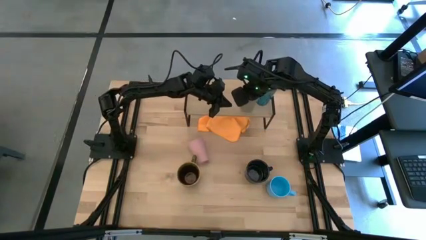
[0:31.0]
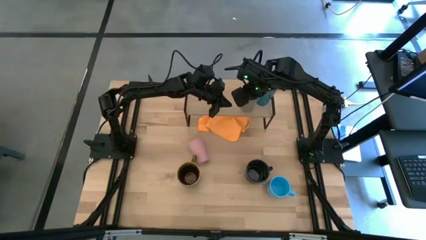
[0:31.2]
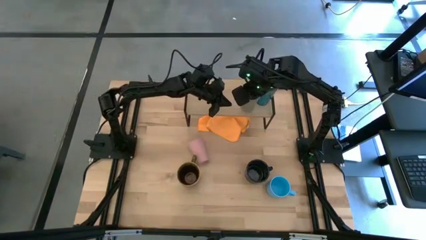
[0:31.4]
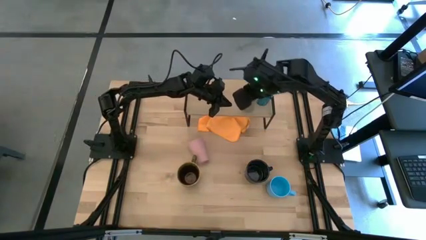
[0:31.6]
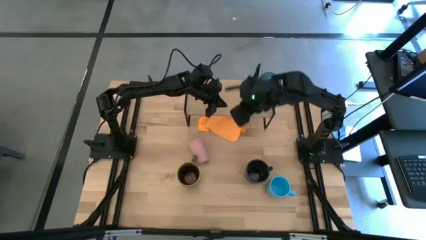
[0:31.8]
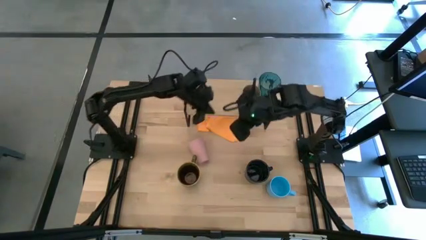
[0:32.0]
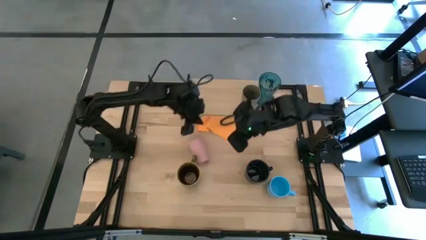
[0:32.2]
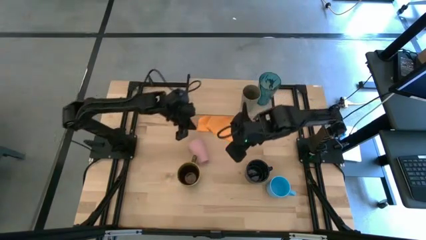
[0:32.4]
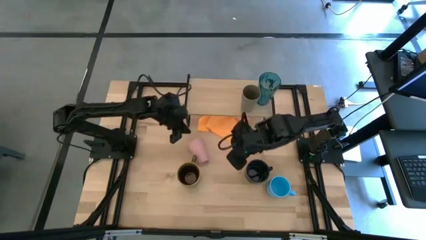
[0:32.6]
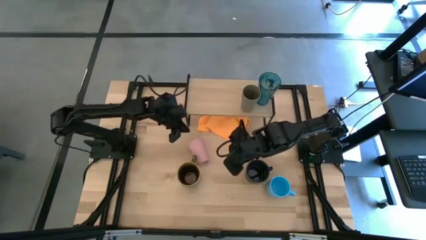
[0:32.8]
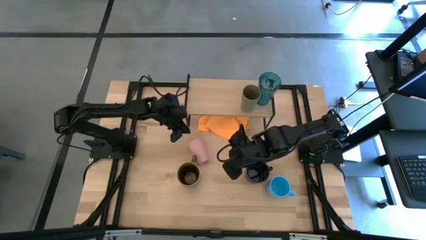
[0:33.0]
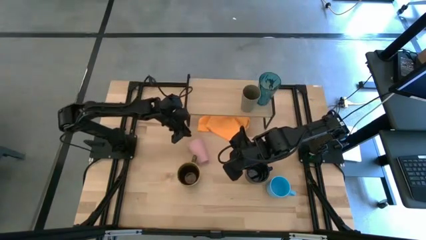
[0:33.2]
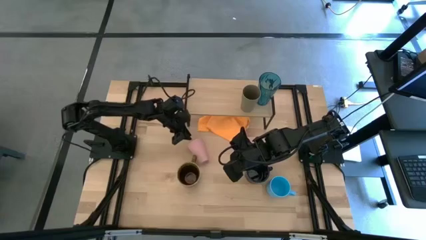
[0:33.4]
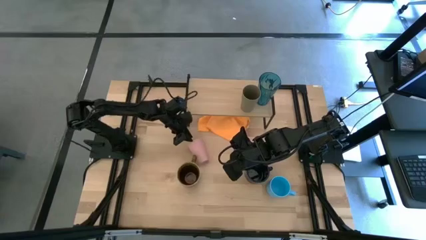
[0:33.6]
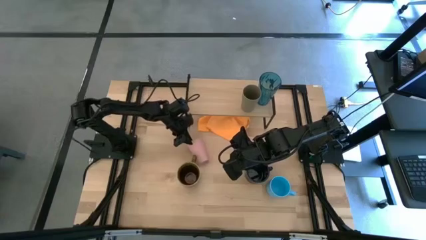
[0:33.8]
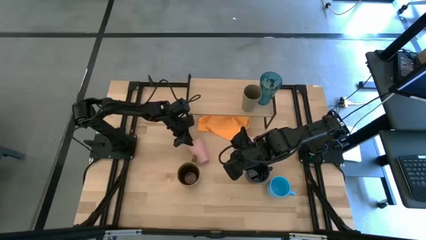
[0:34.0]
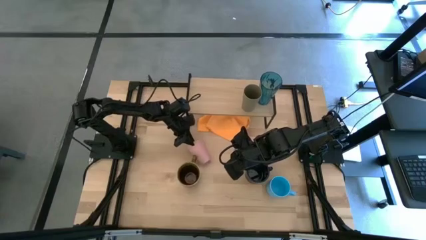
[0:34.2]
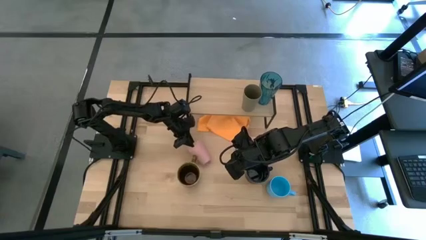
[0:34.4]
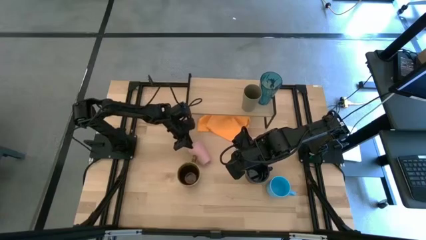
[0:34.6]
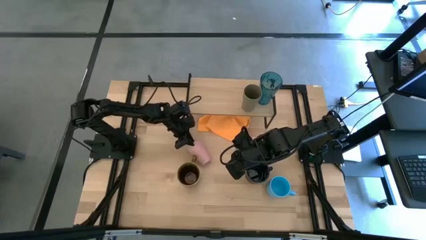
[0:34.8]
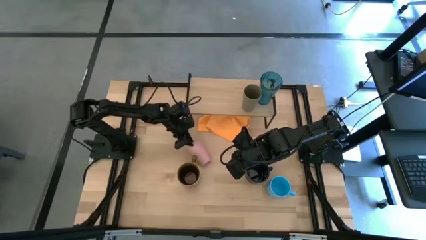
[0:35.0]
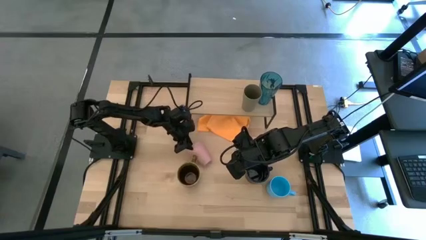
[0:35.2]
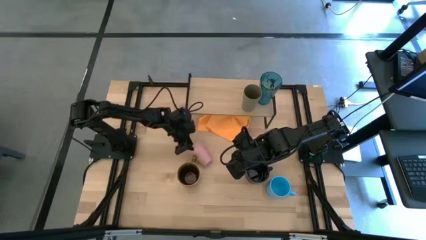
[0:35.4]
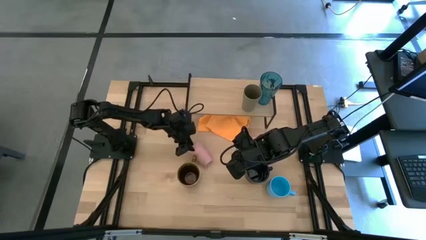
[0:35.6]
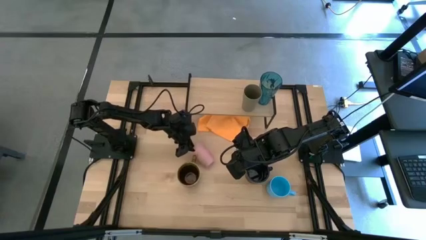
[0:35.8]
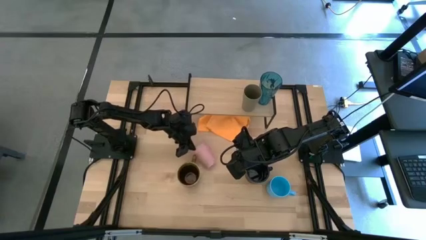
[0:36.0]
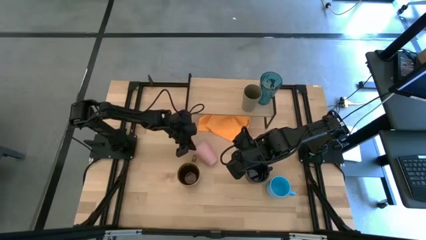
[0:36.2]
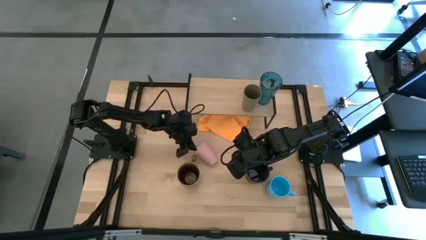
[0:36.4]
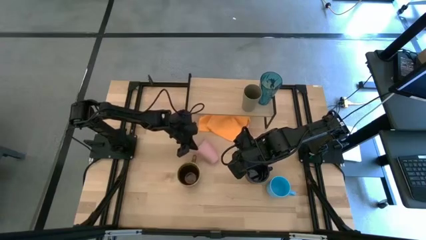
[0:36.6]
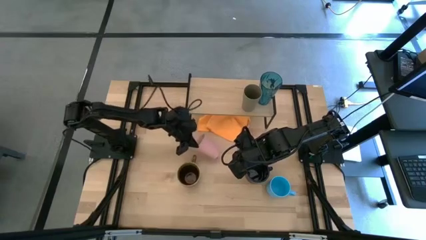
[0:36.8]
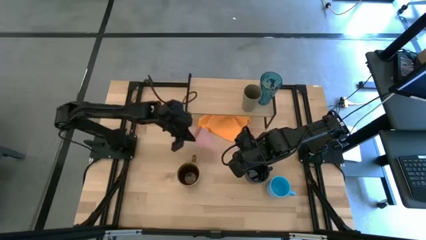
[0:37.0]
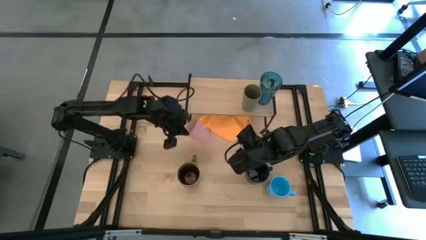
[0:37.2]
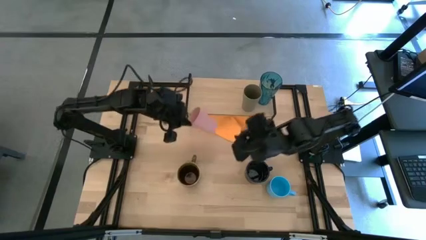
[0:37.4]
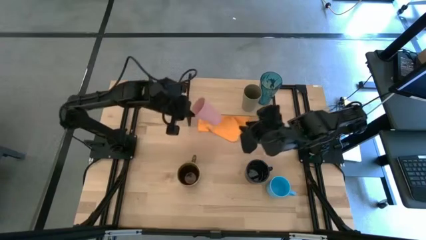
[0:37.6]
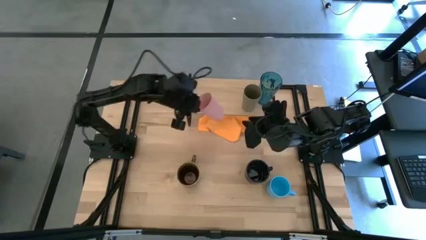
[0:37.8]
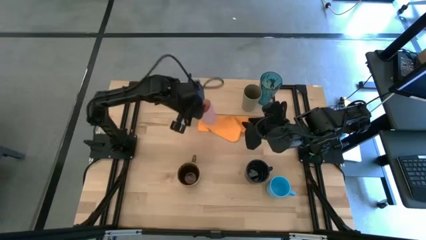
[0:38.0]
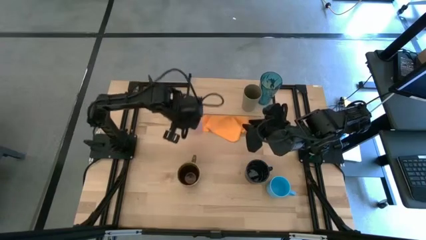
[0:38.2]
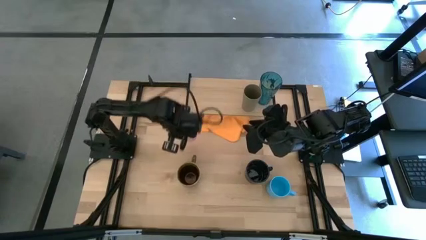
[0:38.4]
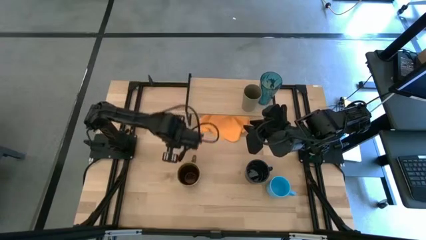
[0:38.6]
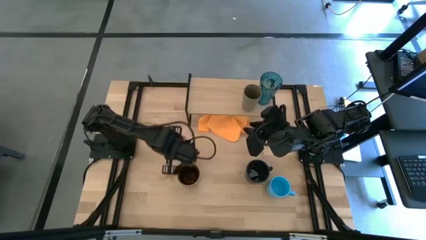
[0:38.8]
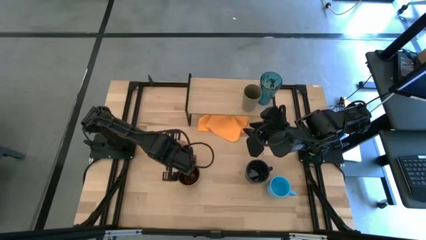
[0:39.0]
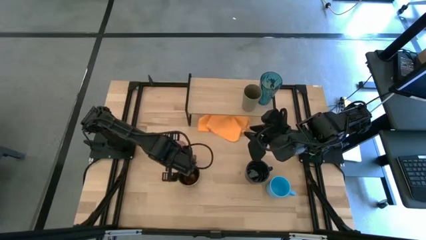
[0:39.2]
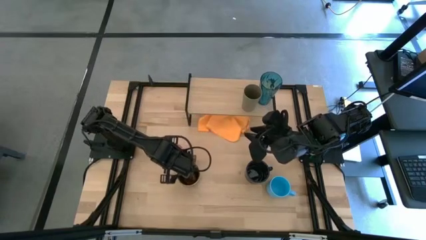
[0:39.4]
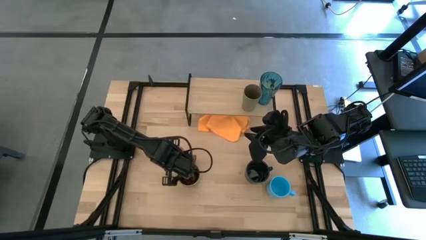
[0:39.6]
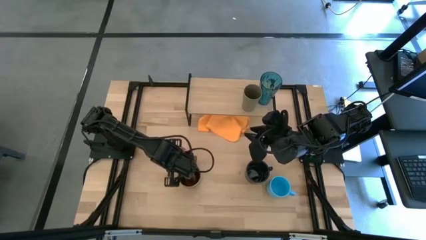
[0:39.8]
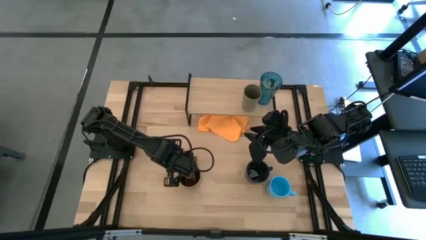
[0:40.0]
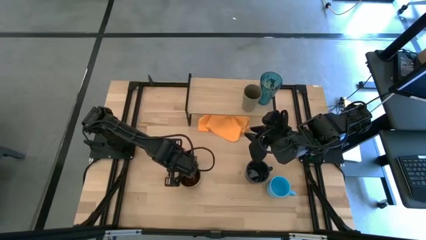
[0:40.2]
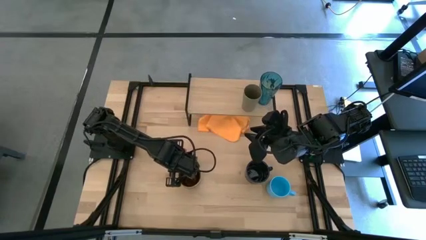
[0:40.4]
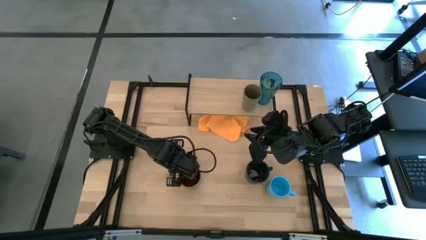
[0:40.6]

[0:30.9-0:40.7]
Task: Stack small to large cups/mugs on shelf
Adjust the pink cup on the shelf

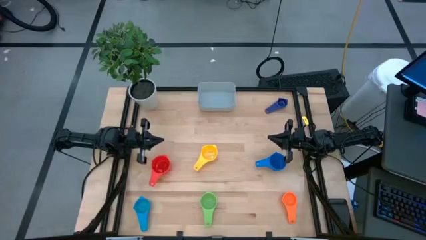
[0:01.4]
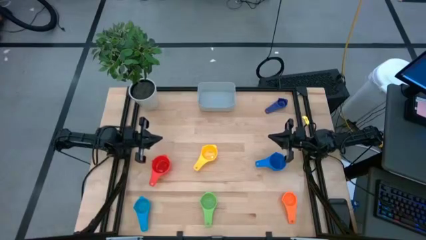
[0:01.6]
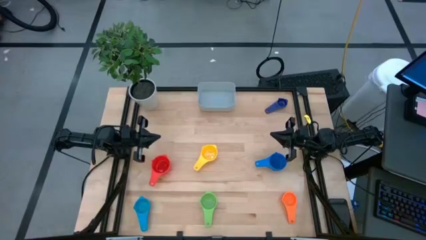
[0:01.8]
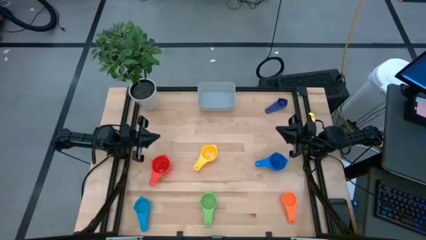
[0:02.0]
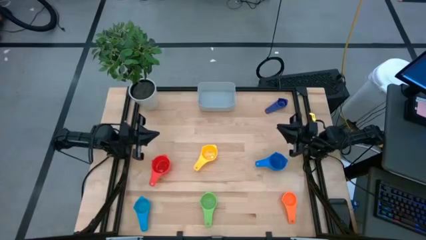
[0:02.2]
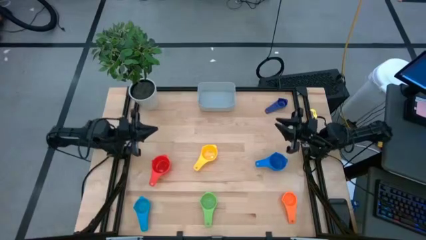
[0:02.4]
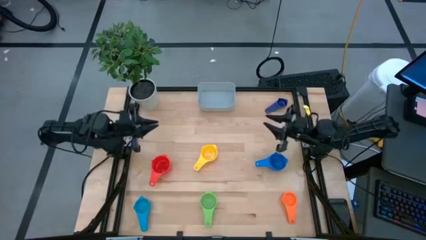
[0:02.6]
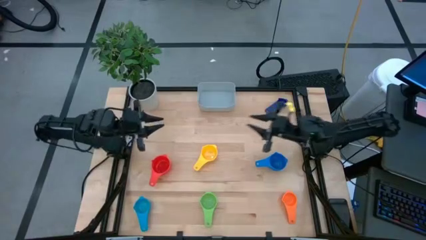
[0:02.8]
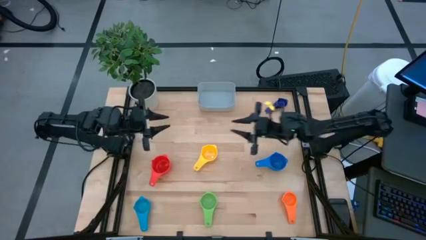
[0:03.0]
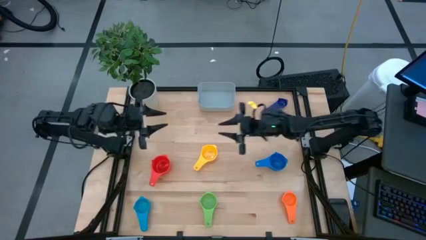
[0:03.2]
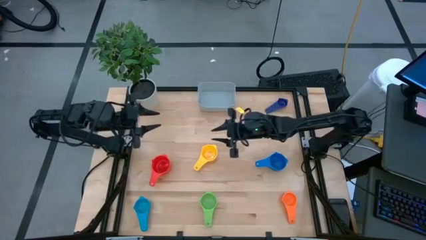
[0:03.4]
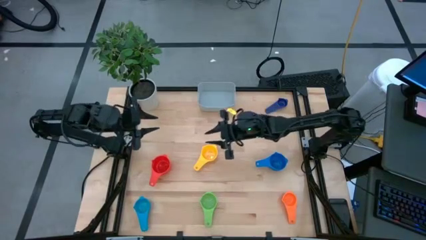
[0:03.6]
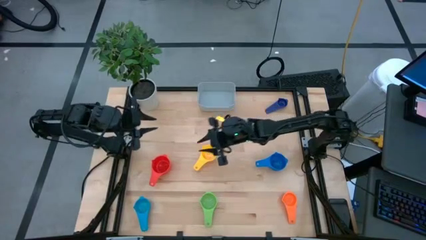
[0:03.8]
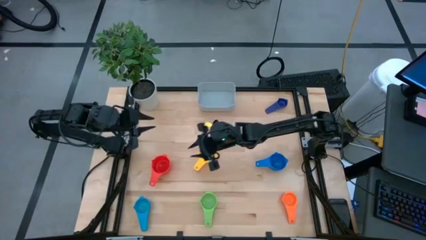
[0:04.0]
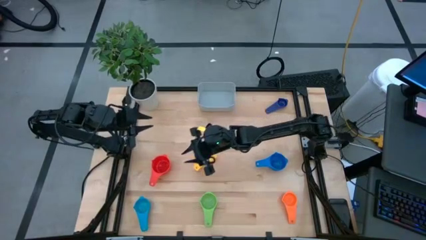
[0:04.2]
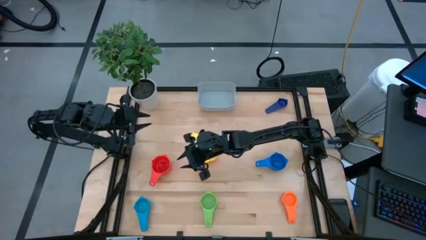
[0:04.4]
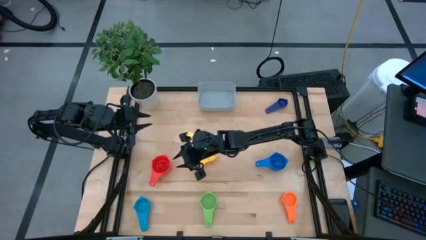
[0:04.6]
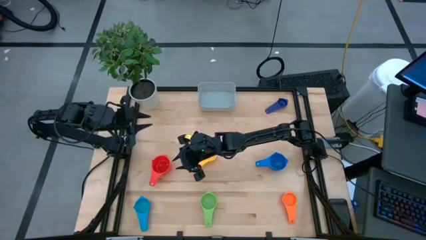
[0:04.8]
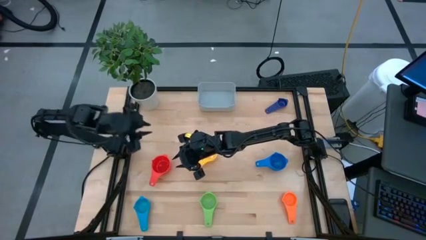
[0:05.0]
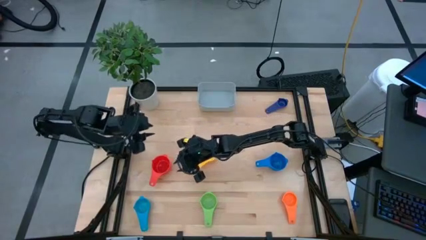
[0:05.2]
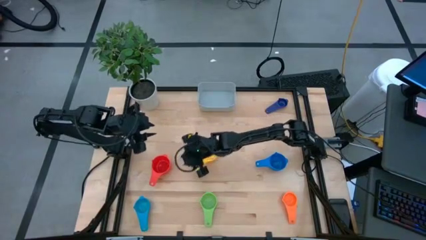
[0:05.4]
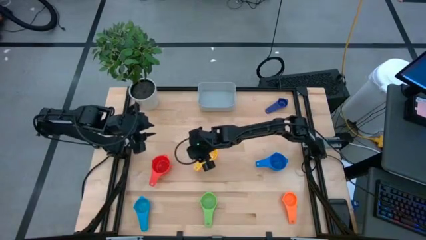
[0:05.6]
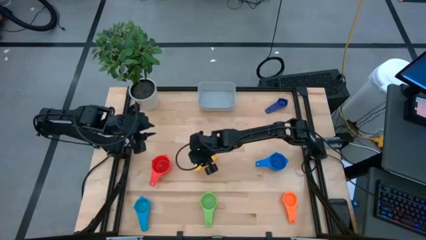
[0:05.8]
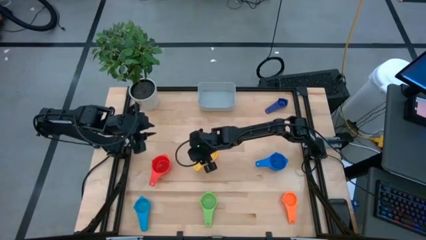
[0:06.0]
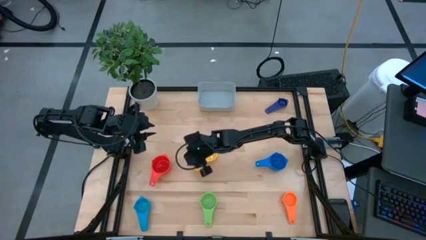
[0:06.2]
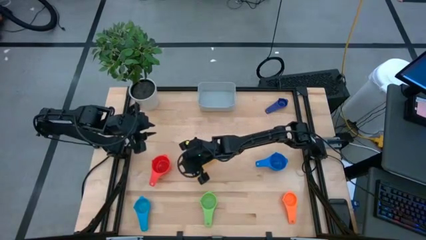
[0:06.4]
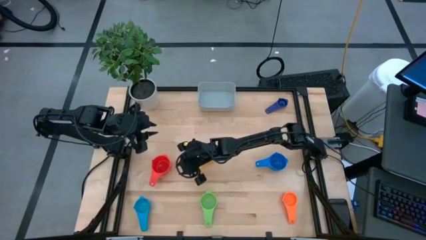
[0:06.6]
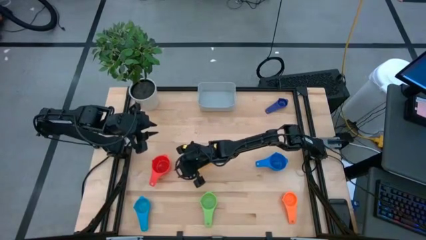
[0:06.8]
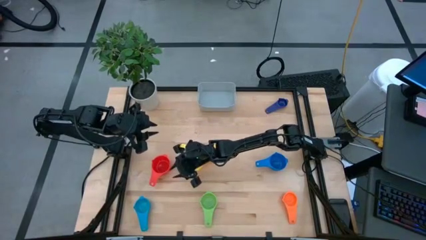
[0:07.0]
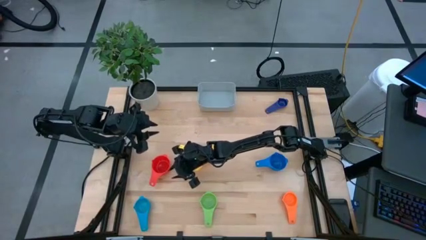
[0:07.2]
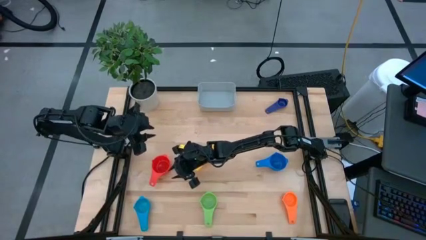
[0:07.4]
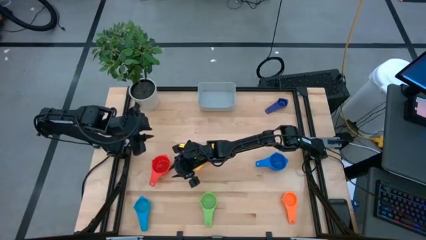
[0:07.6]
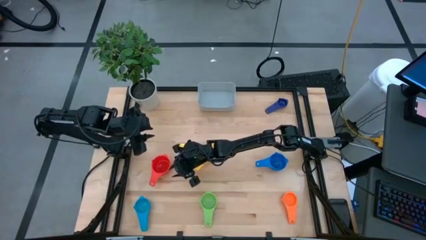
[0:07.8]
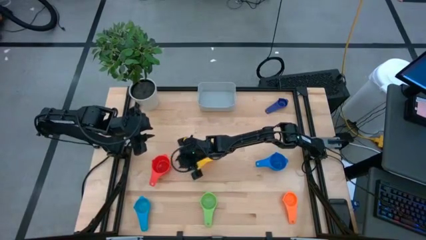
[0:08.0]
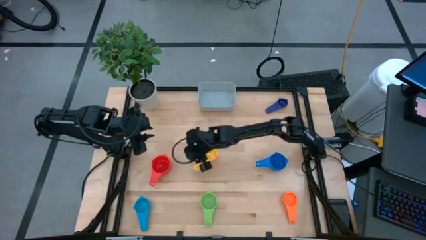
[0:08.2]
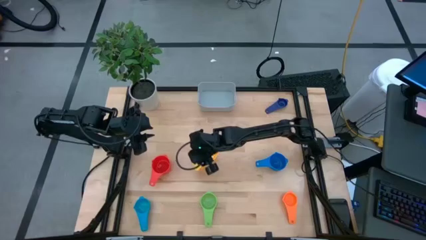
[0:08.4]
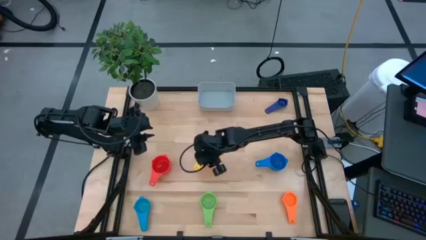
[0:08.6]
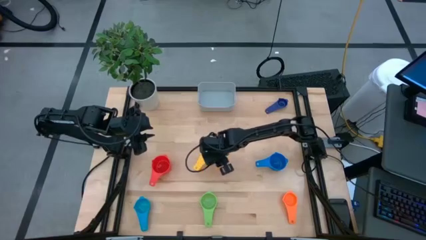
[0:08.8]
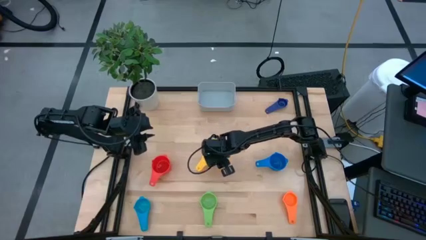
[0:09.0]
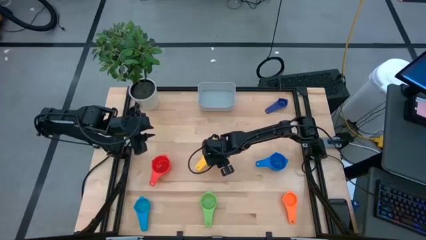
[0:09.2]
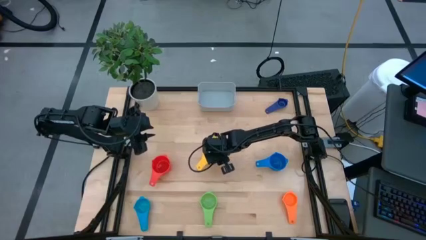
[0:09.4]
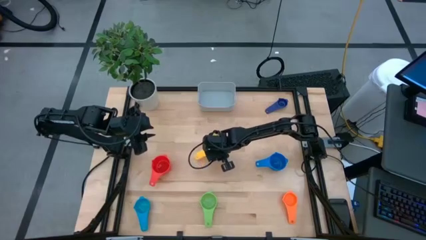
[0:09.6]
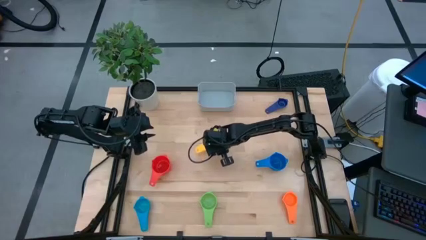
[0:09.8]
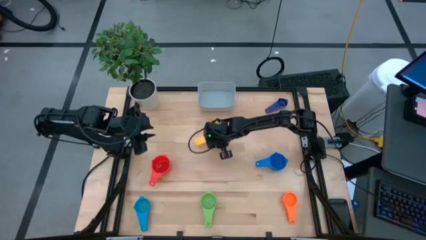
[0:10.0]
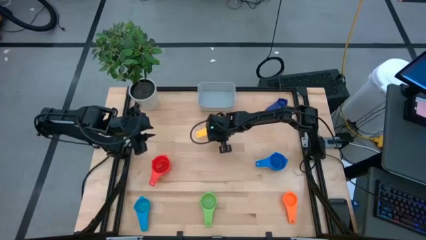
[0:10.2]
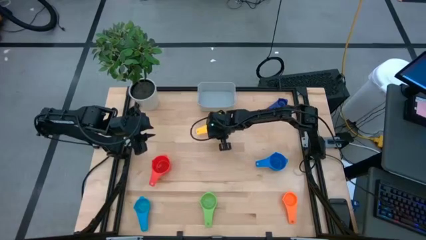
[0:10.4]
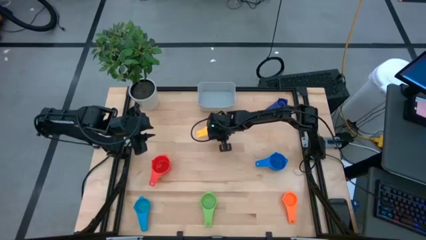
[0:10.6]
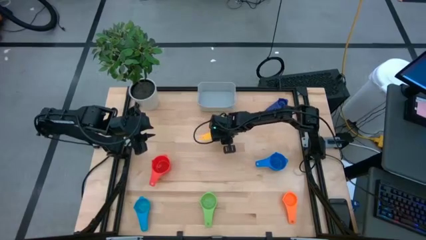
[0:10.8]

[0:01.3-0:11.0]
Task: Nest measuring cups in basket
Move the yellow measuring cup to the top of the table
